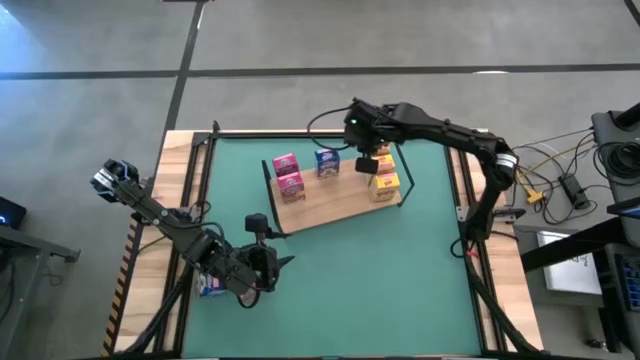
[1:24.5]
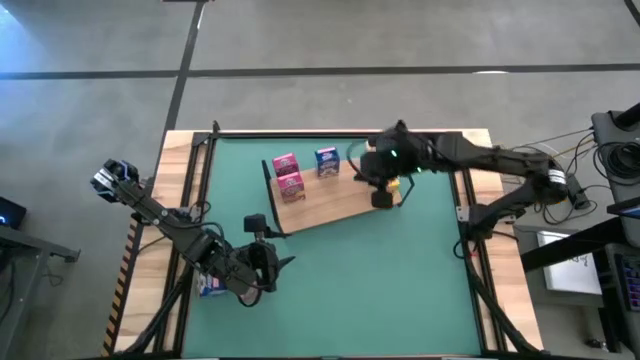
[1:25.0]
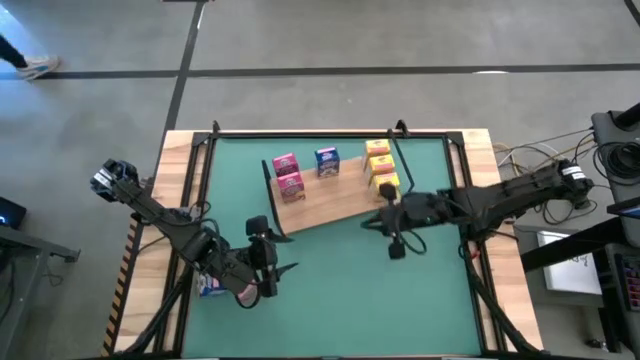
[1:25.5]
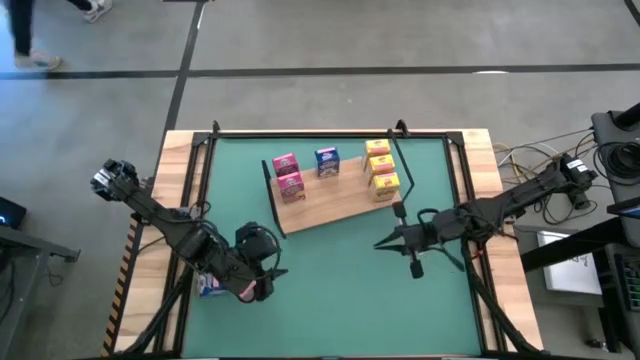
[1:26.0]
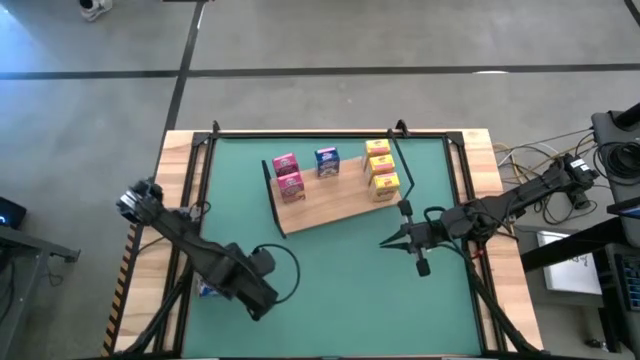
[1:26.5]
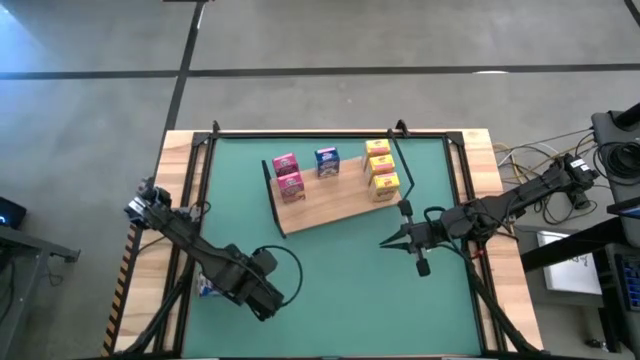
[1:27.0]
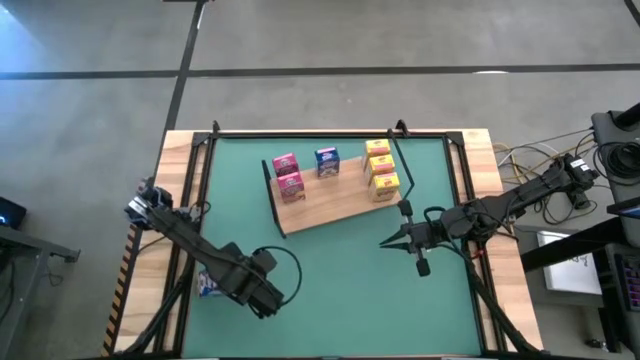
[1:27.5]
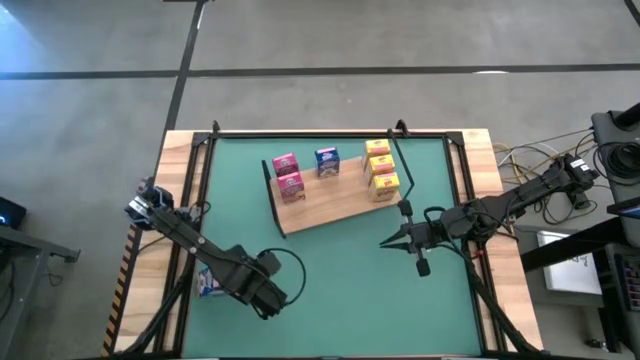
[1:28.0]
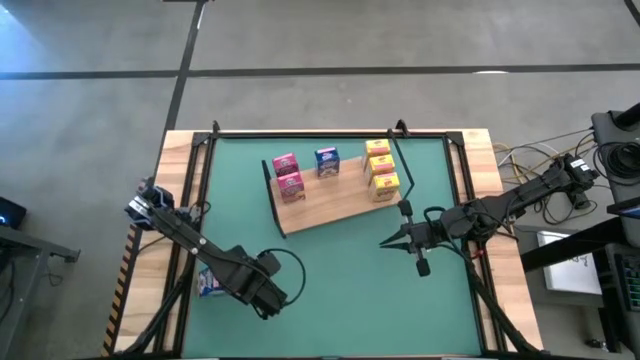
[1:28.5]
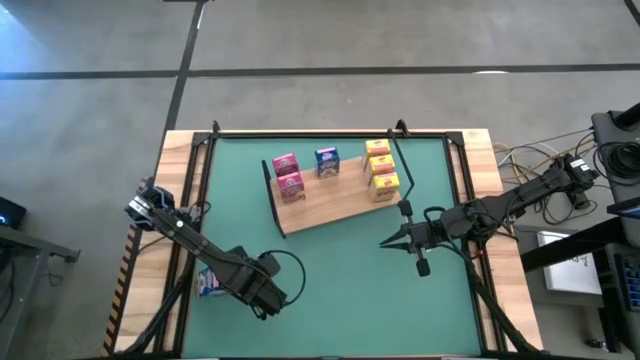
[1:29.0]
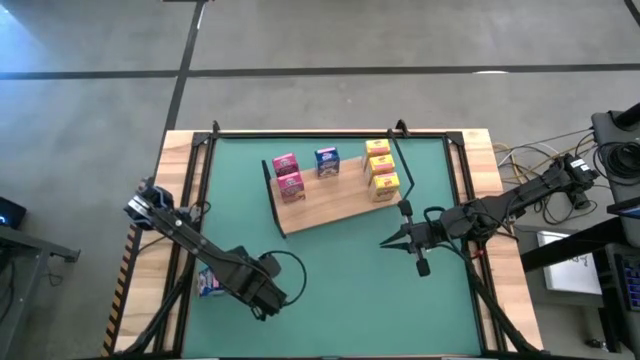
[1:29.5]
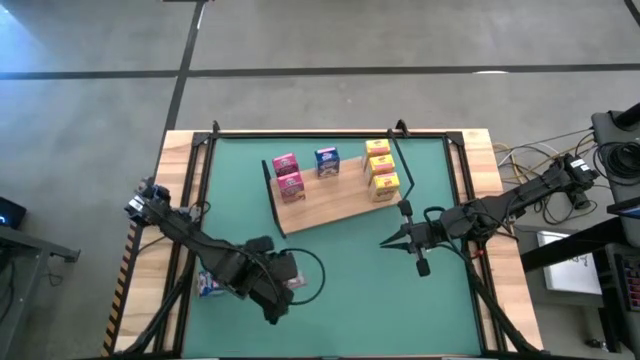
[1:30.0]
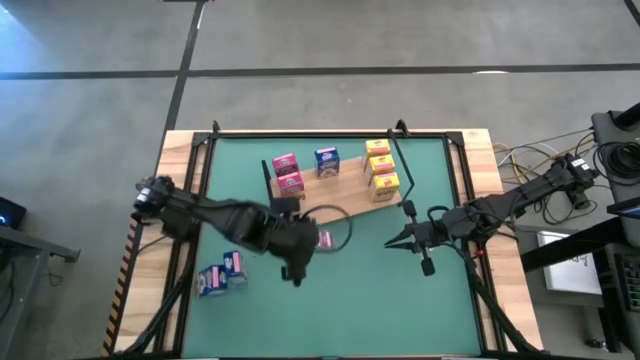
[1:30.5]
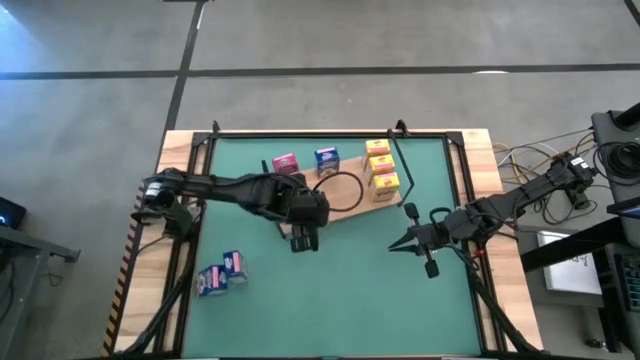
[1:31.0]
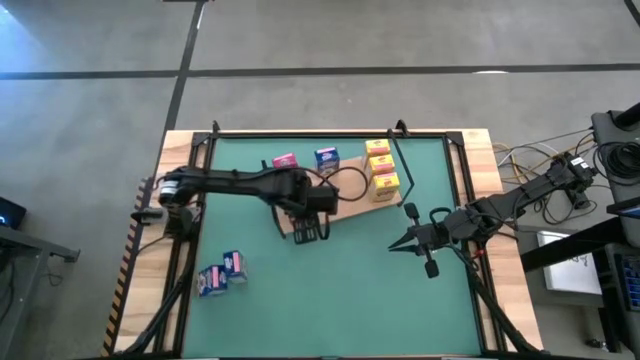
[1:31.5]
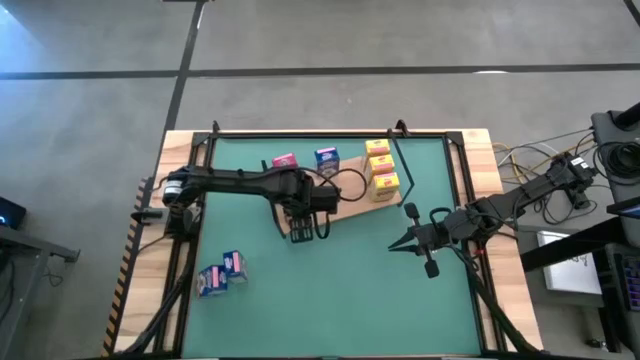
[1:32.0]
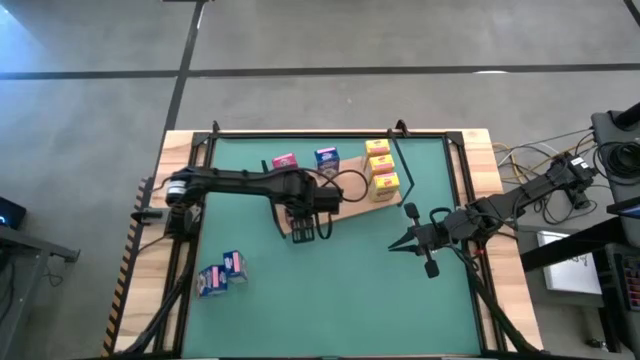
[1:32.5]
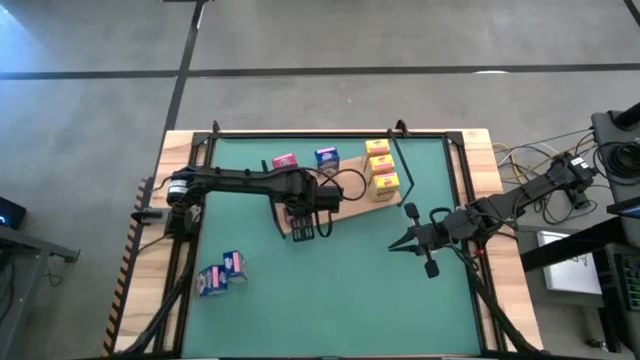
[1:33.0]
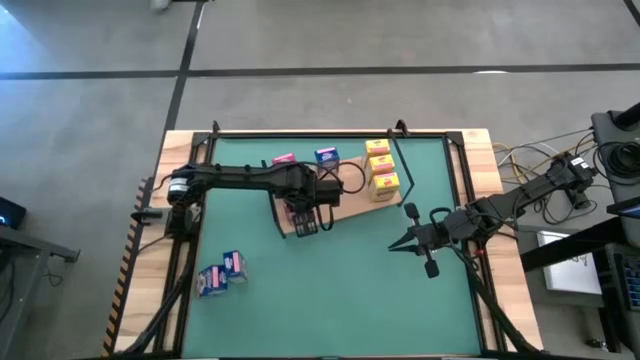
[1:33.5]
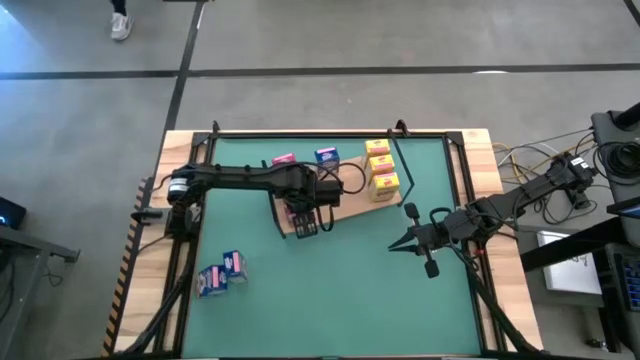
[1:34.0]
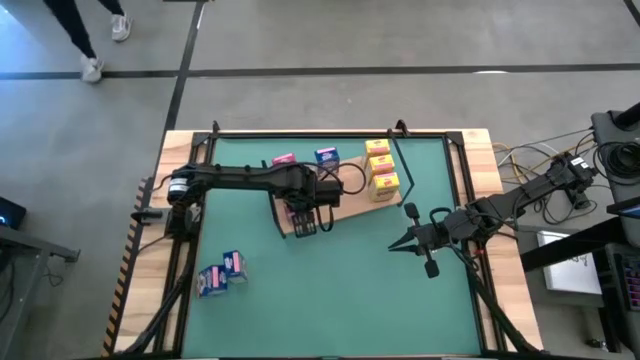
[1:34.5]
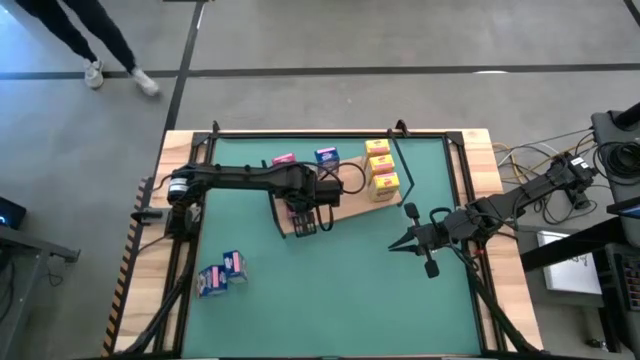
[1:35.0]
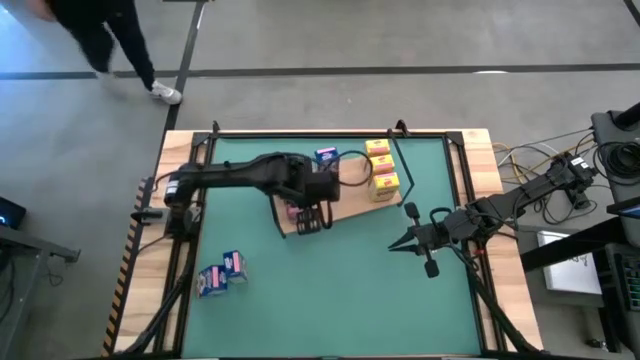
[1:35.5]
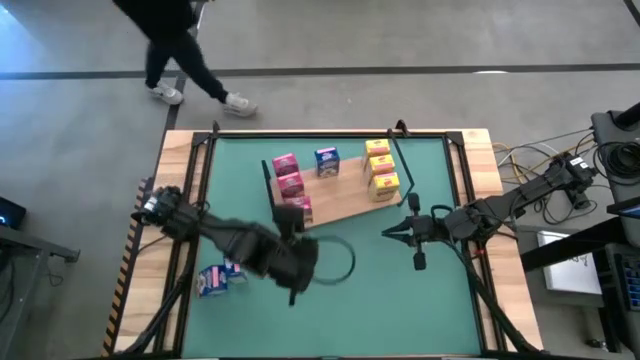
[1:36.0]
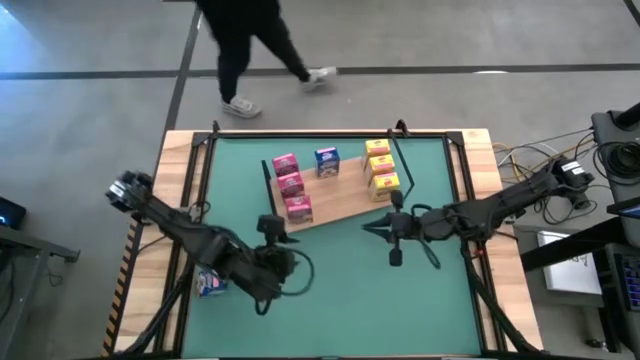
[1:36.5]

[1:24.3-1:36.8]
Task: Stack cereal on shelf
Put the pink cereal box on the shelf aligned with the other pink cereal boxes

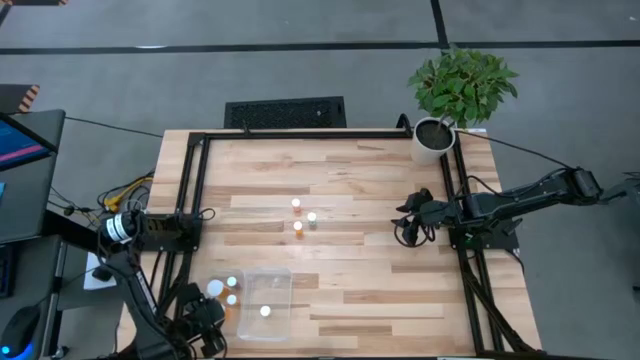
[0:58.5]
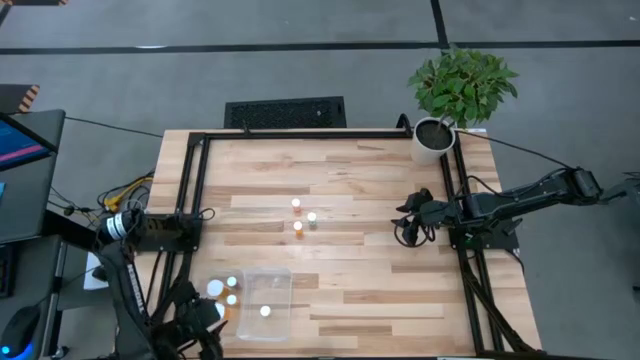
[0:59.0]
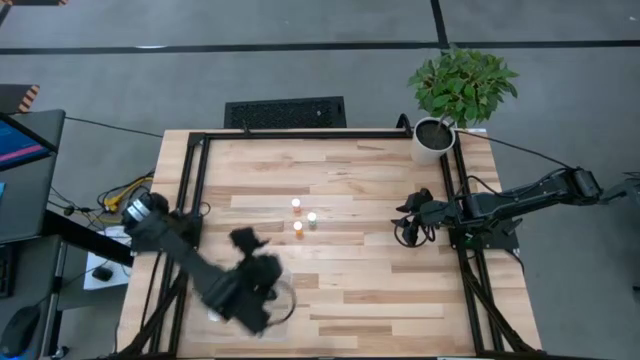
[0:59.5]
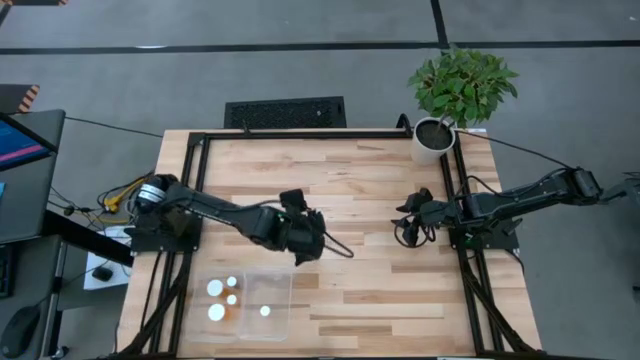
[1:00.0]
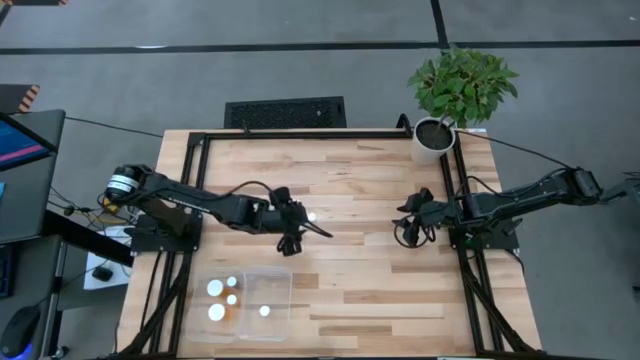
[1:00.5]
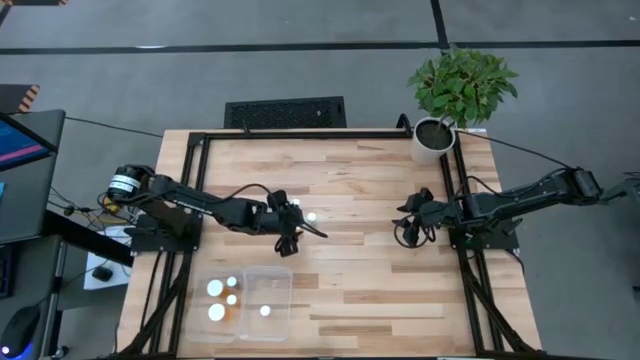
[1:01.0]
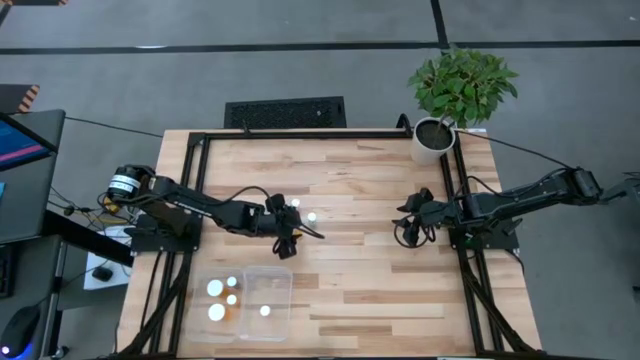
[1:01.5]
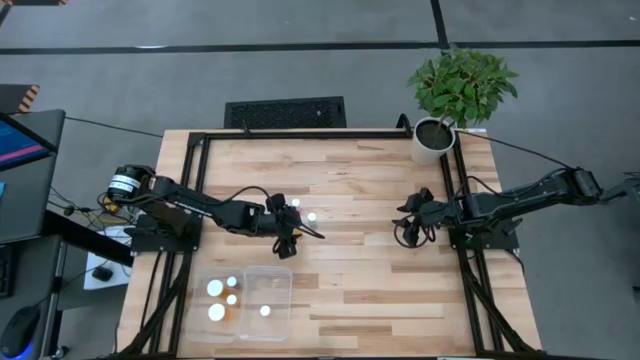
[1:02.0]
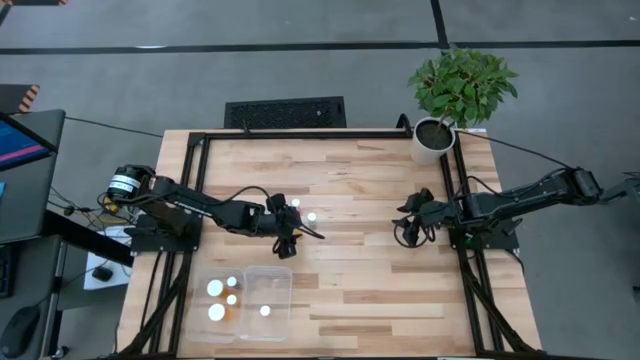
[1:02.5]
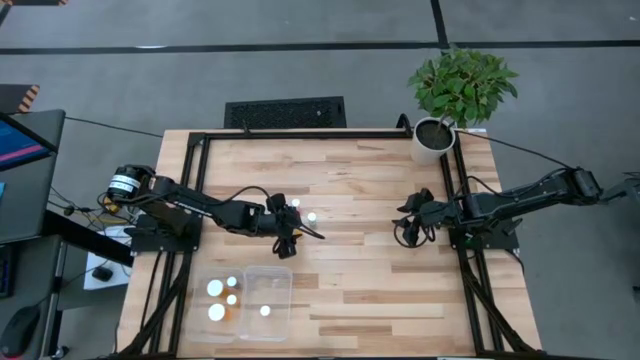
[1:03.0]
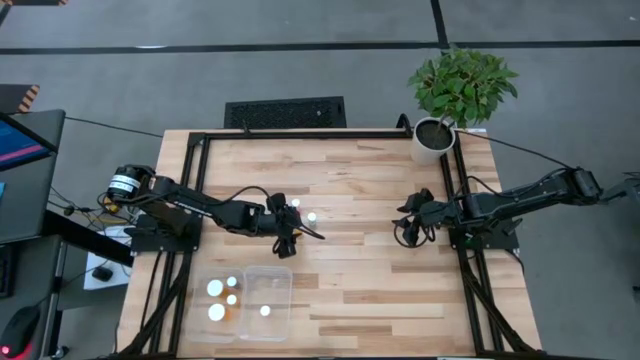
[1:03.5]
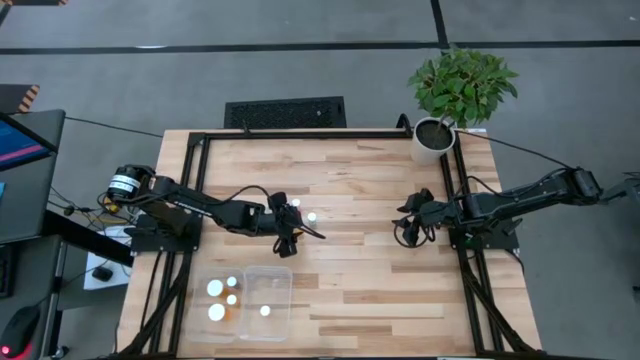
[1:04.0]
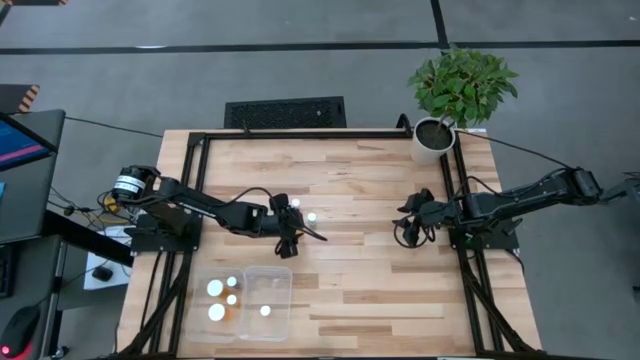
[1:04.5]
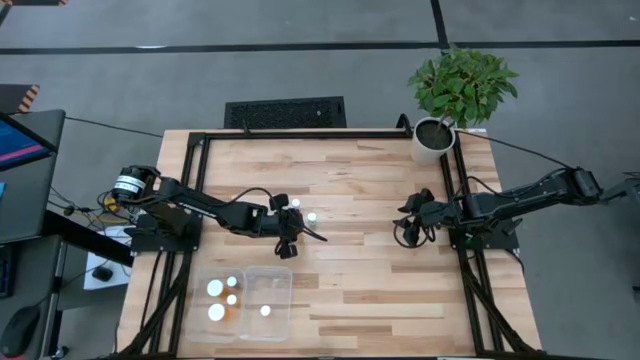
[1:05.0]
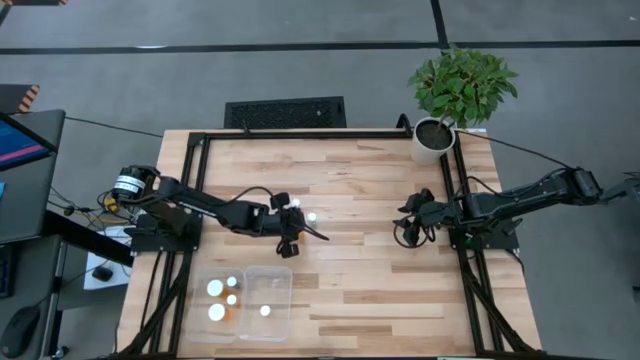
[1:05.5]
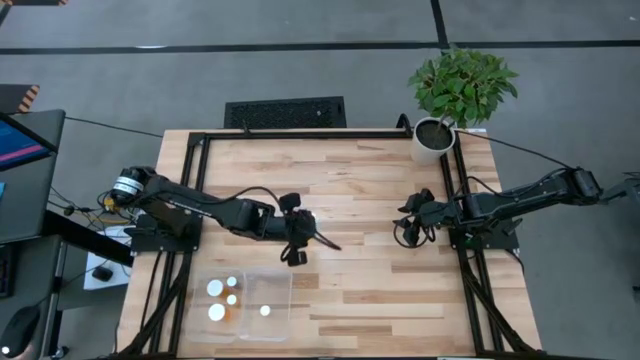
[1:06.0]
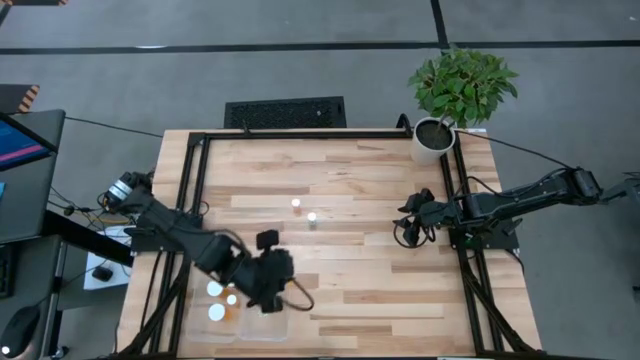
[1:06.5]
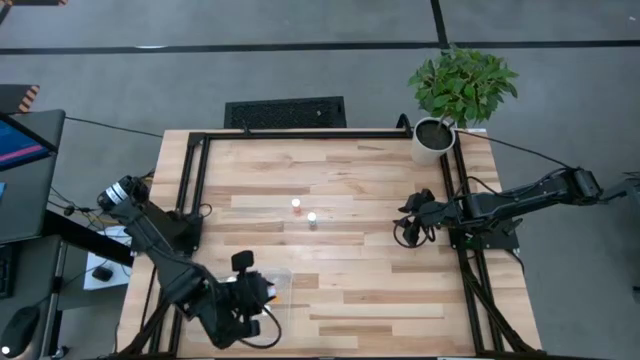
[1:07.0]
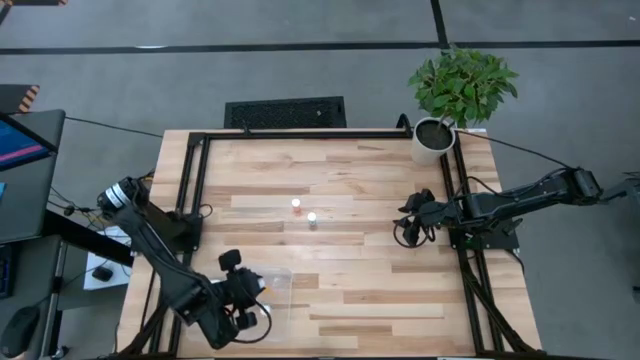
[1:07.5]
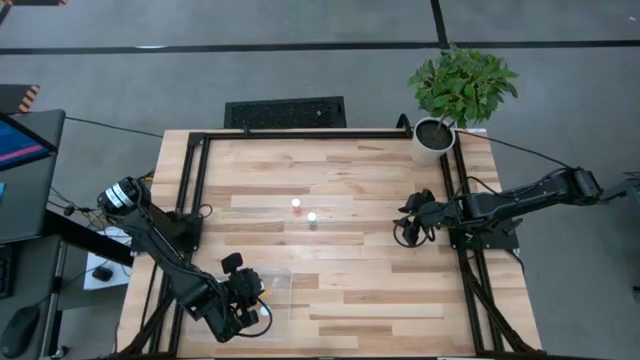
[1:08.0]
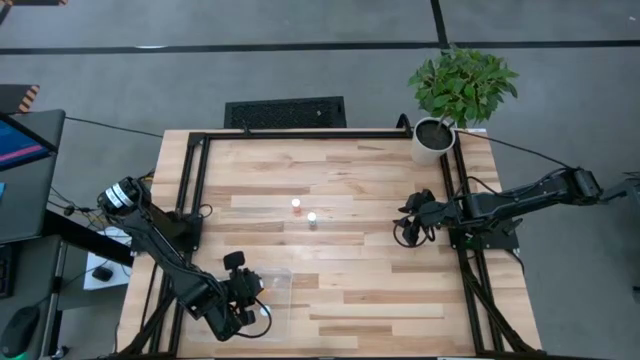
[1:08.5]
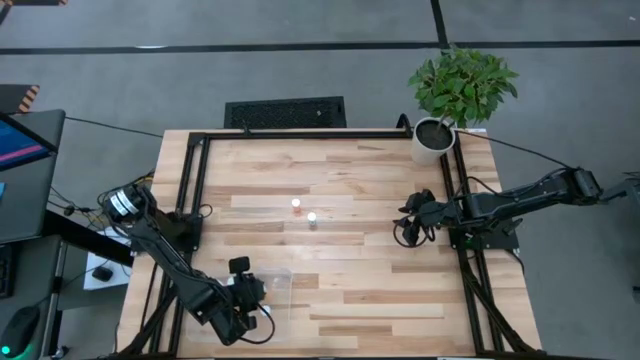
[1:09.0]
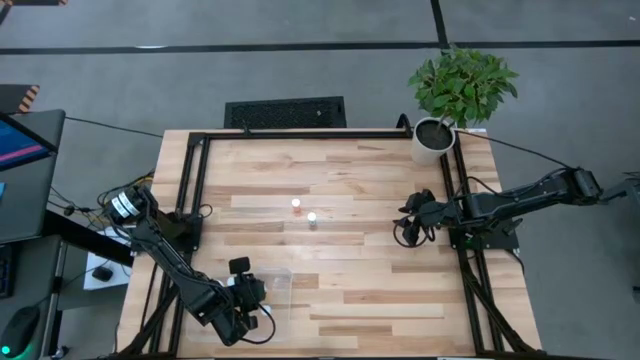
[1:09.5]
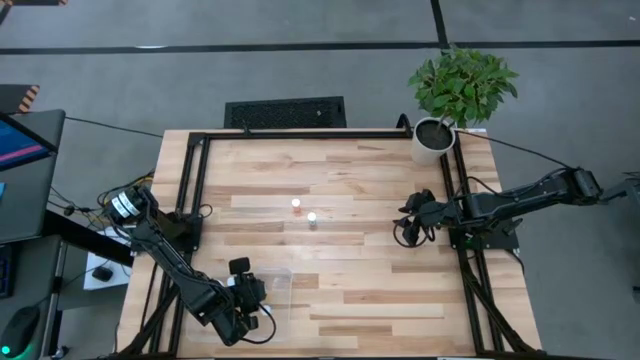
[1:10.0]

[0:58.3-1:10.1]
Task: Pick and place medicine bottles into bin by pill shape (circle, oval)
Put the small orange pill bottle into the right transparent bin
